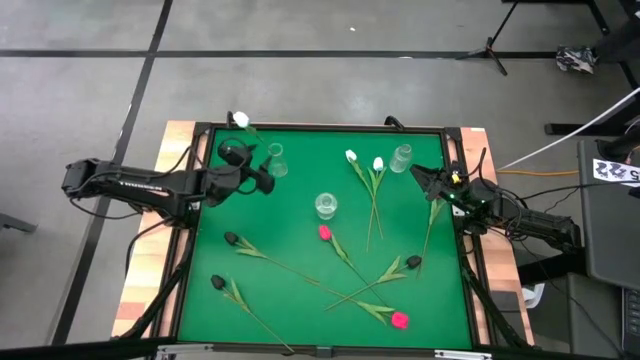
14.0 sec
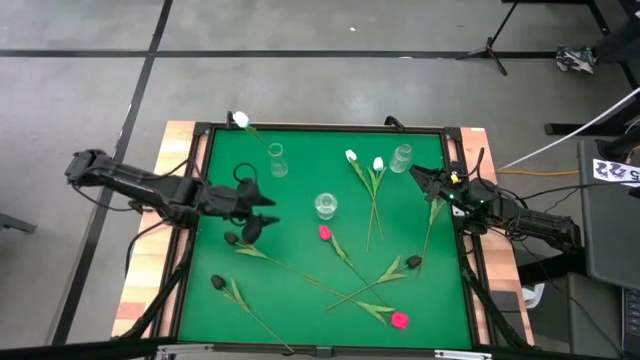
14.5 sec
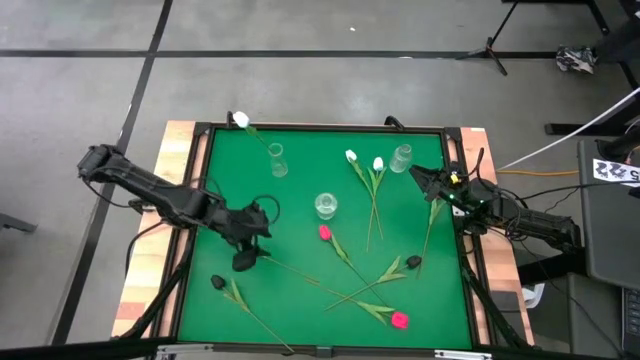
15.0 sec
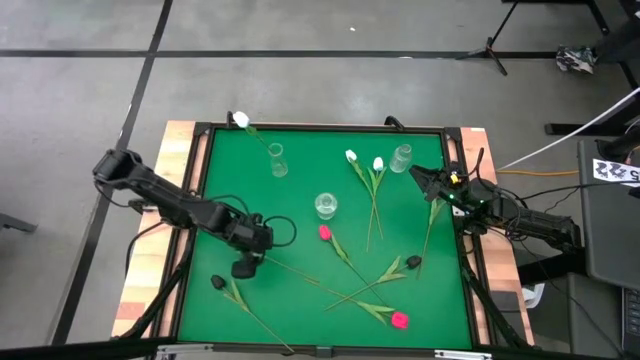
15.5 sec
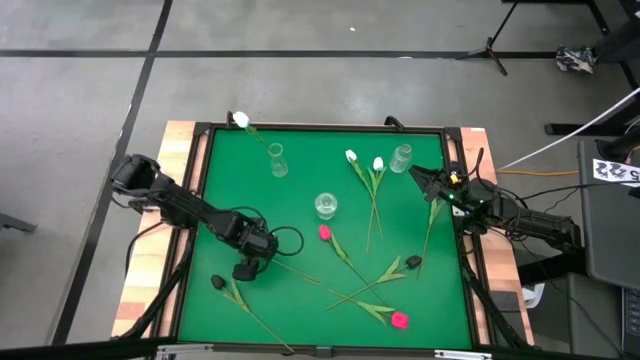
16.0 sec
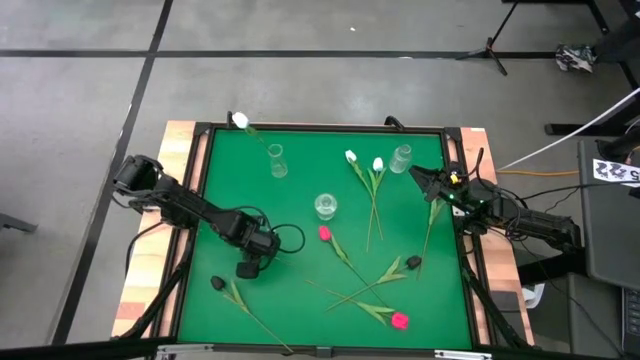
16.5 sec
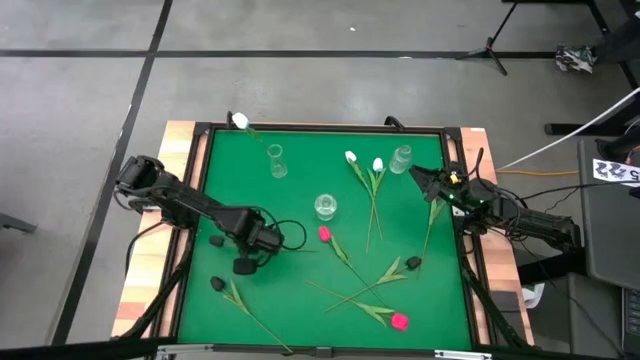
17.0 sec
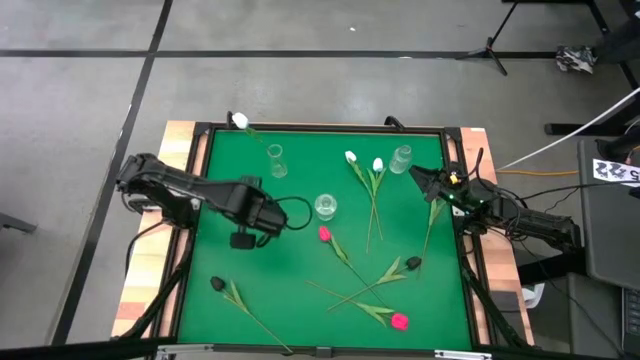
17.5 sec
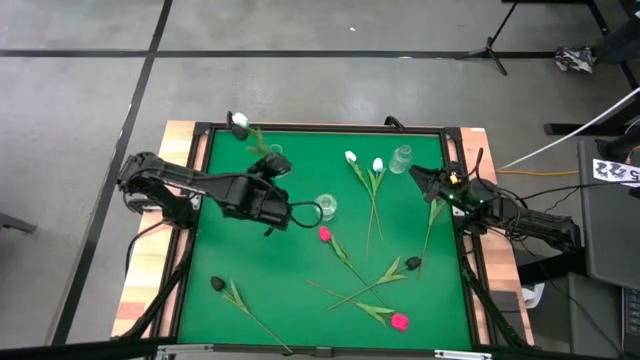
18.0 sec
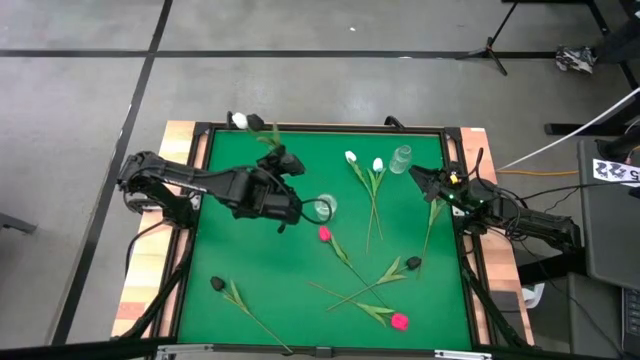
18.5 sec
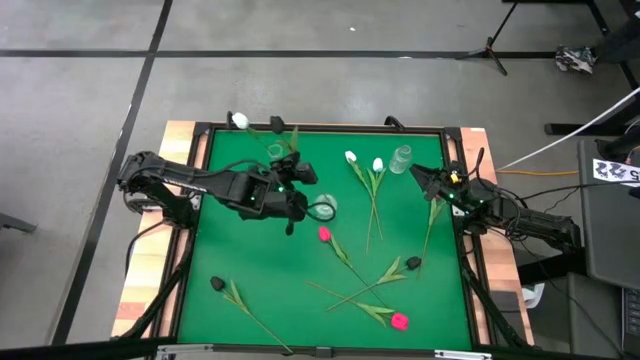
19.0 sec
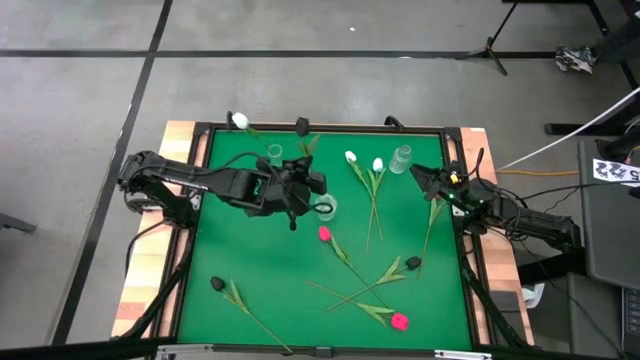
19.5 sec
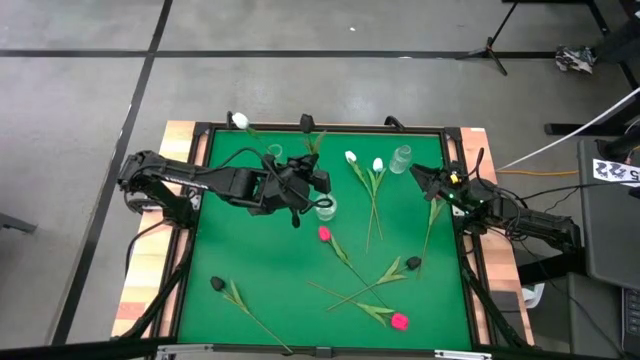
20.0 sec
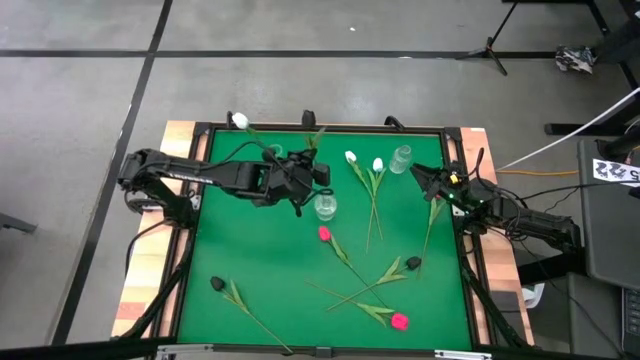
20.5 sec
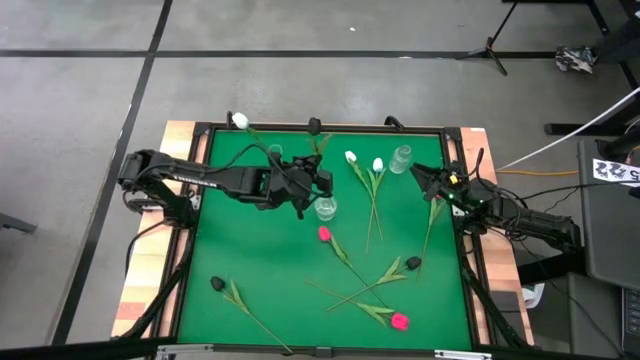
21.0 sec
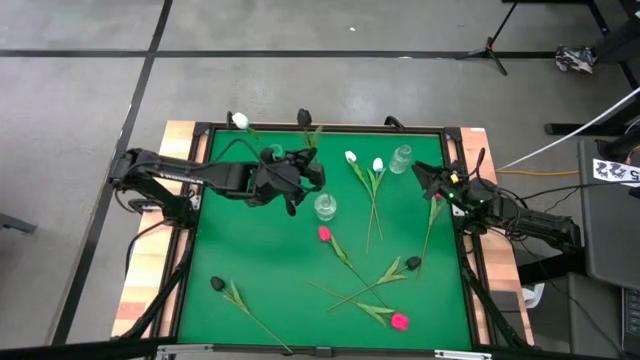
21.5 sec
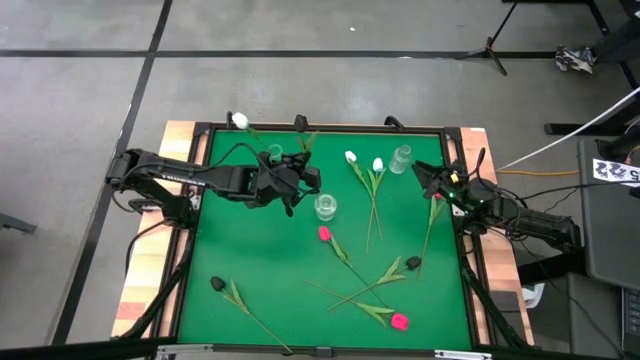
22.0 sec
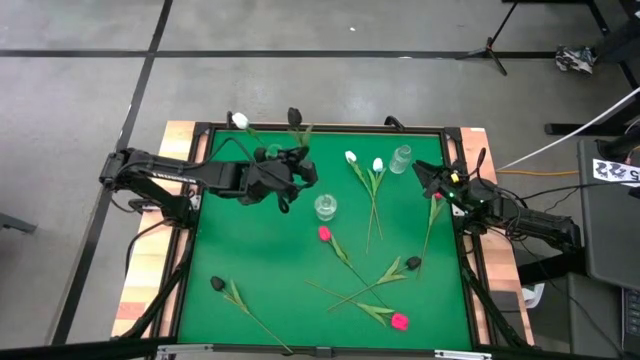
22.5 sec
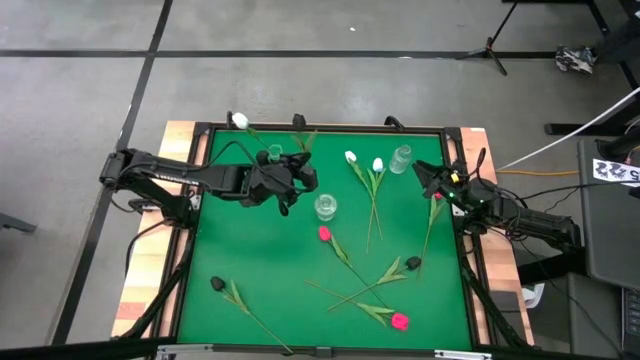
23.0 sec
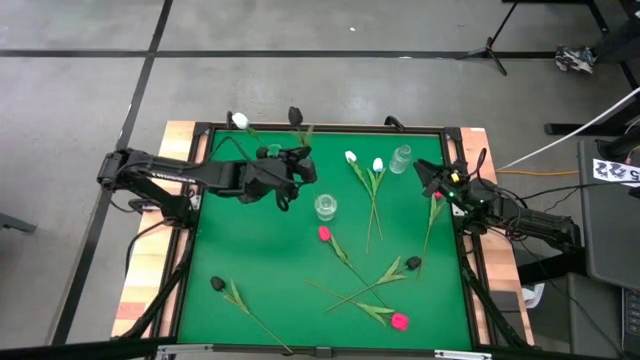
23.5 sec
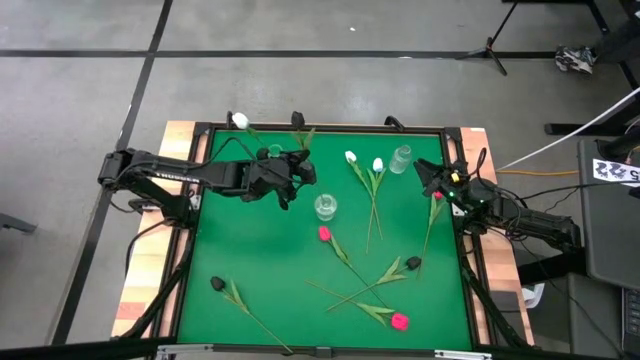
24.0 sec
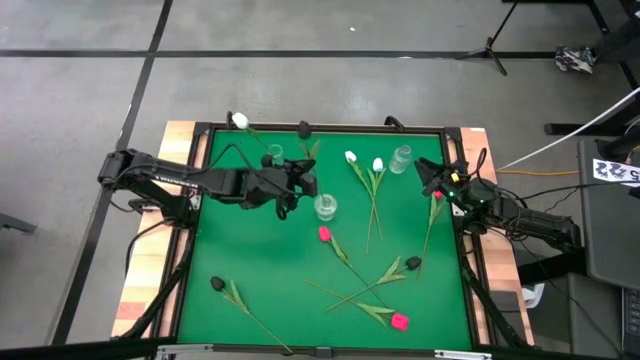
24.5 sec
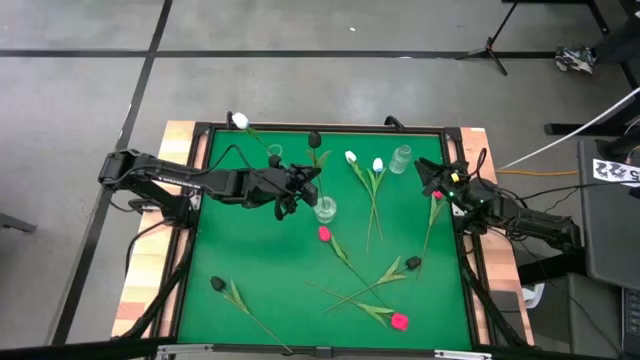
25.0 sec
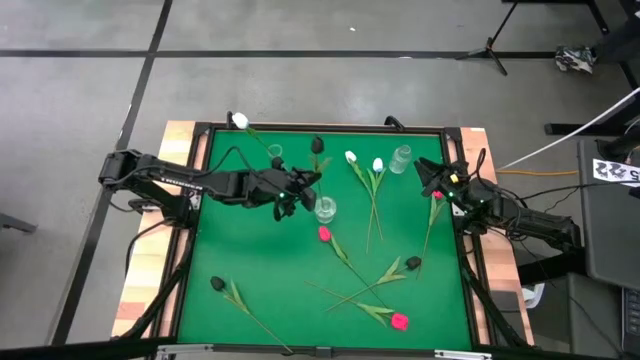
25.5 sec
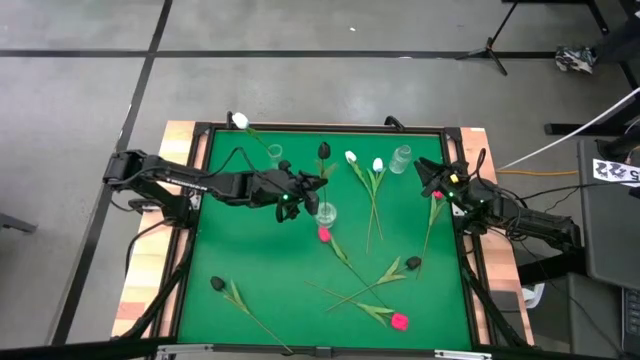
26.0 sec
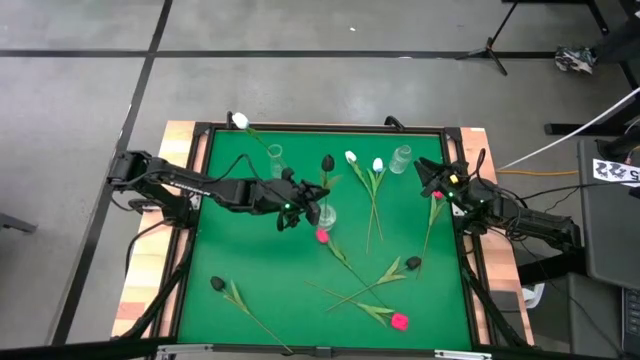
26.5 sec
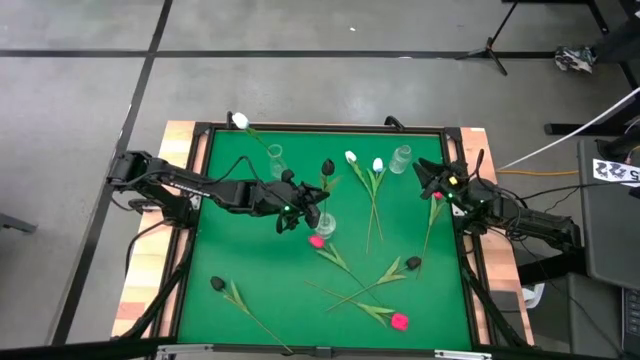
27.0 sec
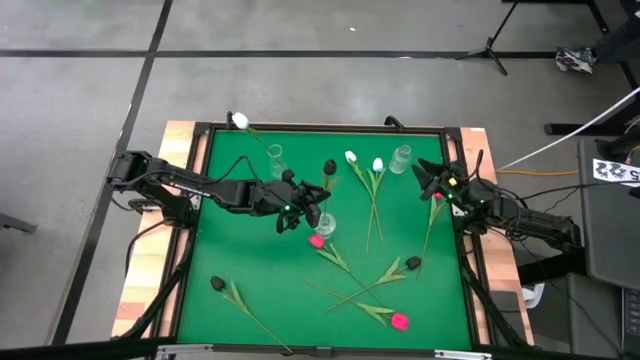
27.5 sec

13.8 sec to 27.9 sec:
Task: Sort flowers into vase by color
Put the top left black tulip into the bottom transparent vase

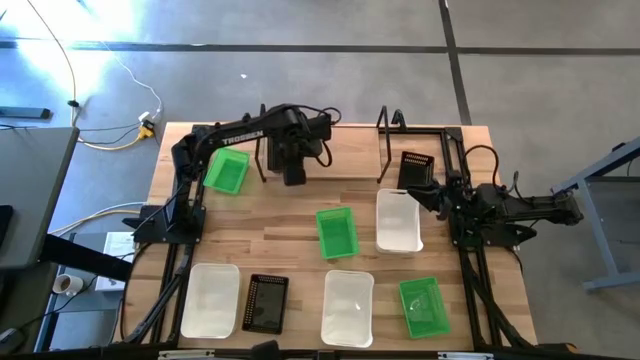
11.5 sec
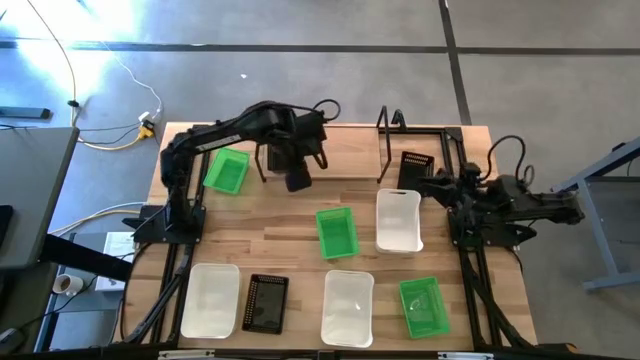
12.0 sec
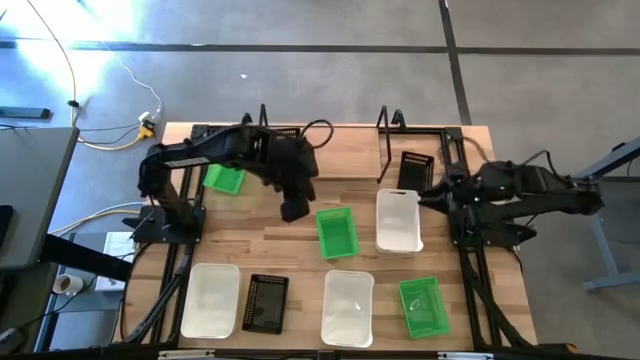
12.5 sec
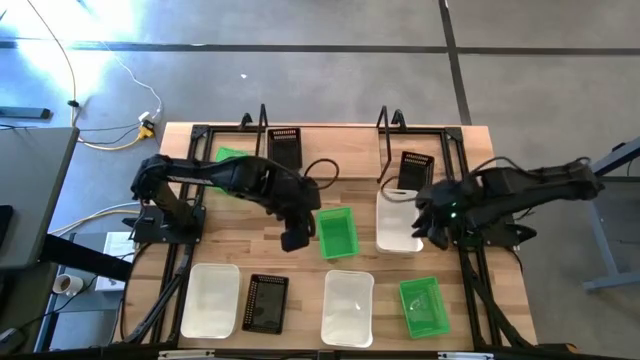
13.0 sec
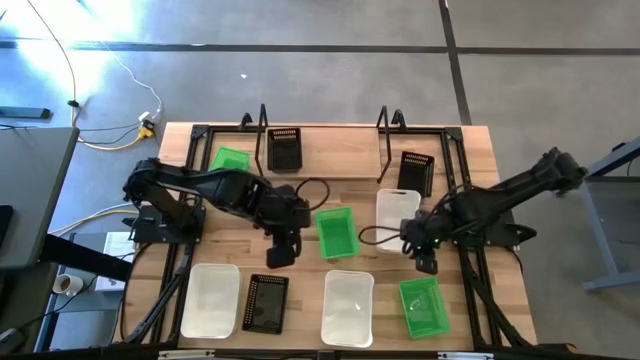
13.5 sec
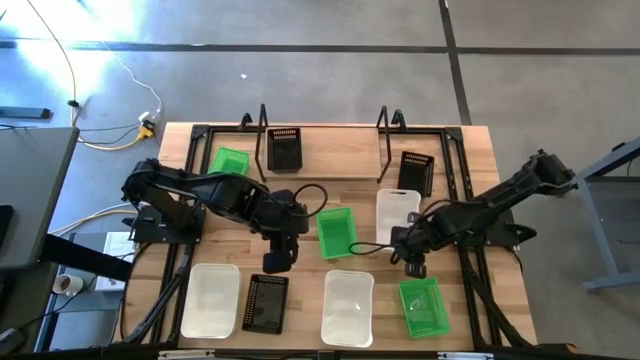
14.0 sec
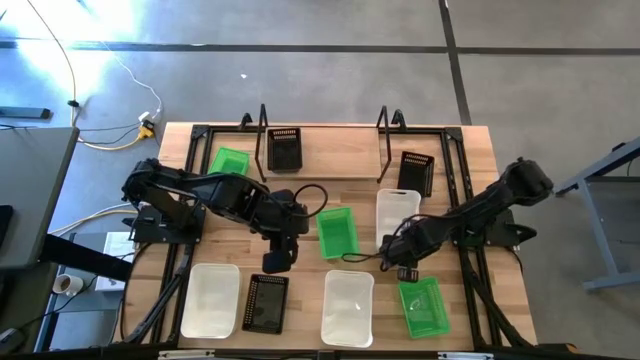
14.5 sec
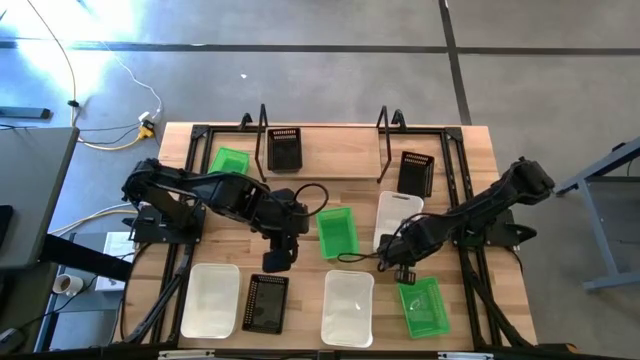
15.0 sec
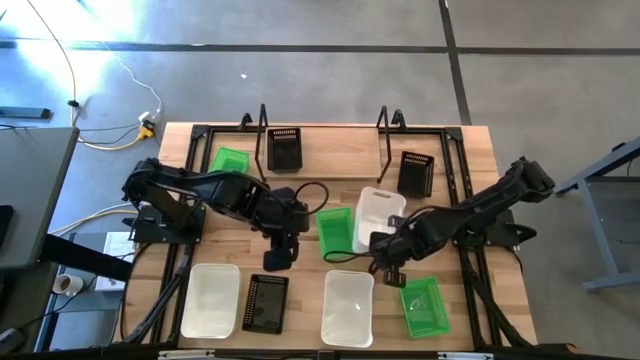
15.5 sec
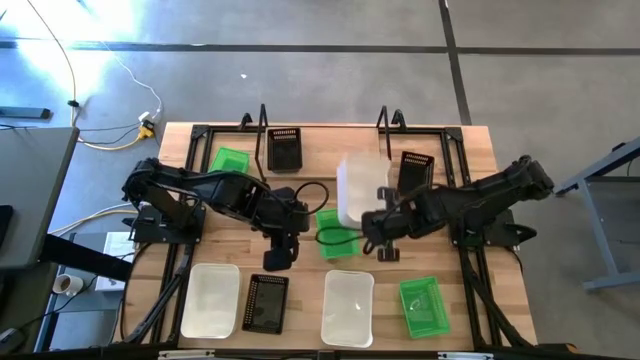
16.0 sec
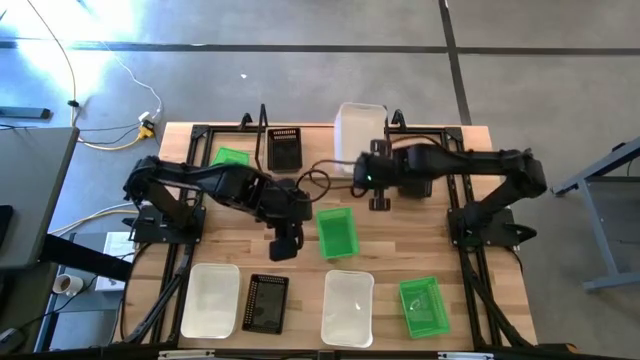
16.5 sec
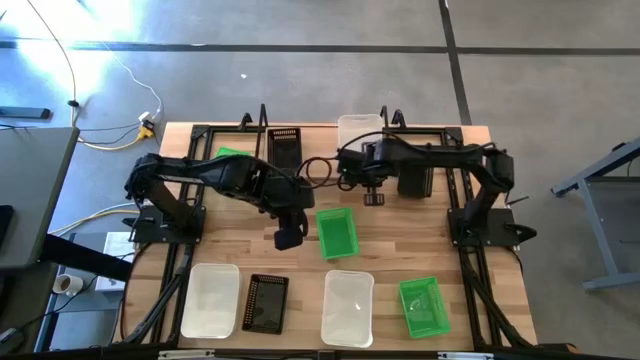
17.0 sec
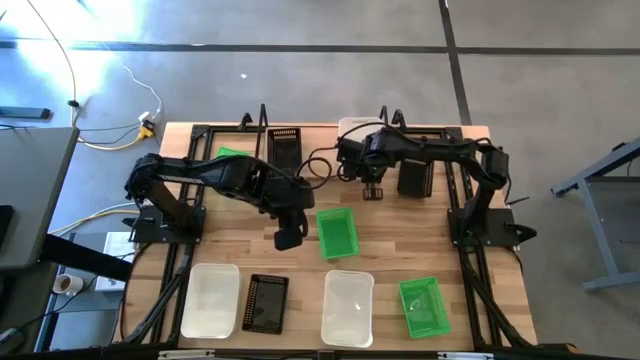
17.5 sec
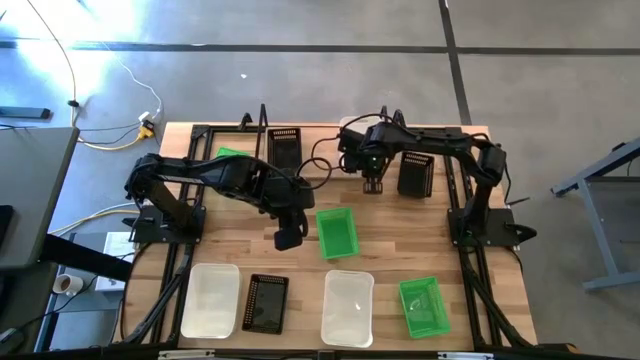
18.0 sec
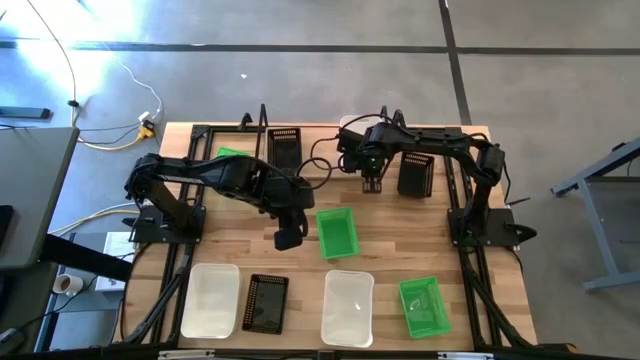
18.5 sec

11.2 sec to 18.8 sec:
Task: Stack baskets on shelf by color
Put the middle right white bin on the shelf
